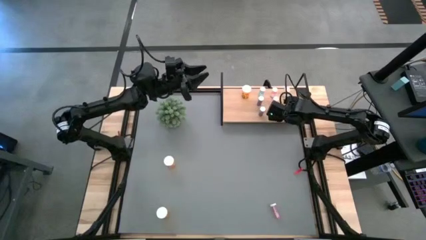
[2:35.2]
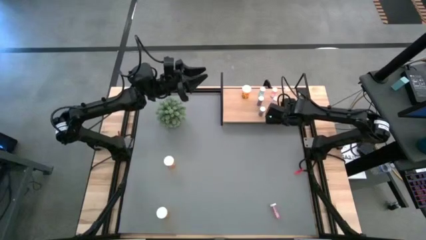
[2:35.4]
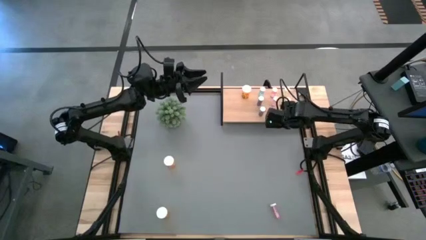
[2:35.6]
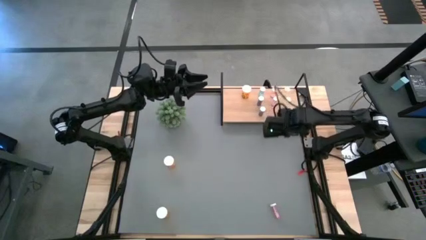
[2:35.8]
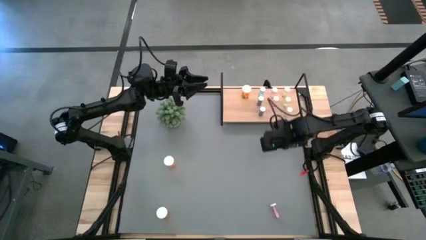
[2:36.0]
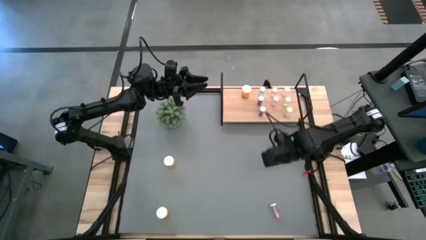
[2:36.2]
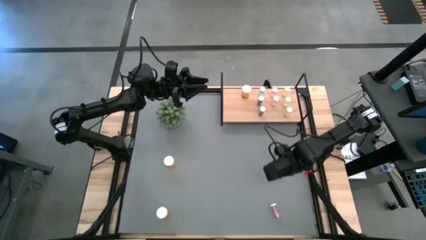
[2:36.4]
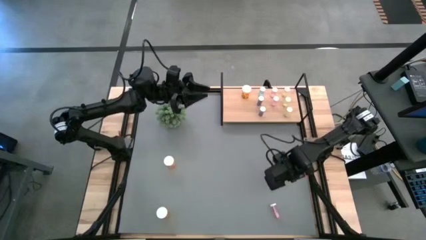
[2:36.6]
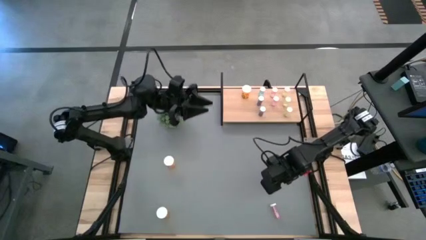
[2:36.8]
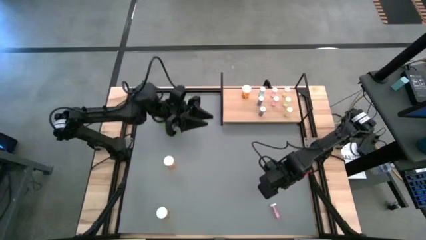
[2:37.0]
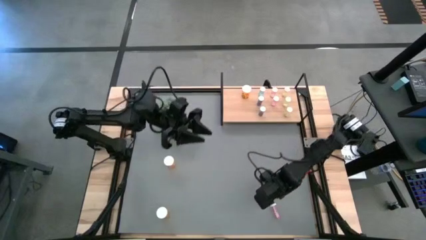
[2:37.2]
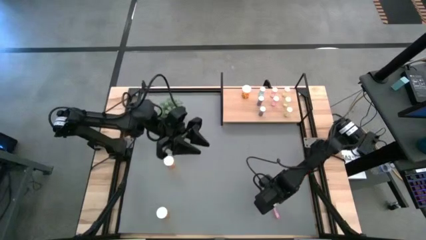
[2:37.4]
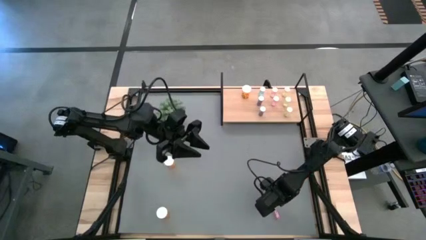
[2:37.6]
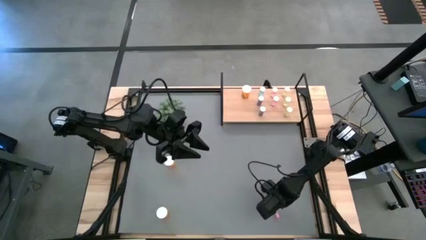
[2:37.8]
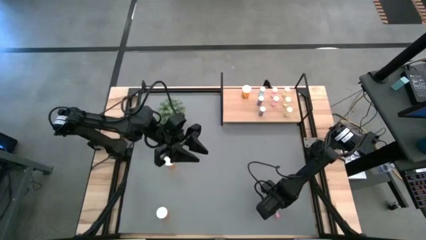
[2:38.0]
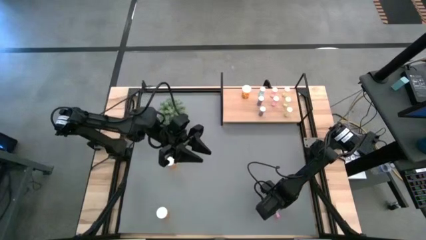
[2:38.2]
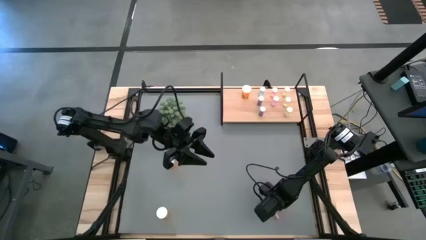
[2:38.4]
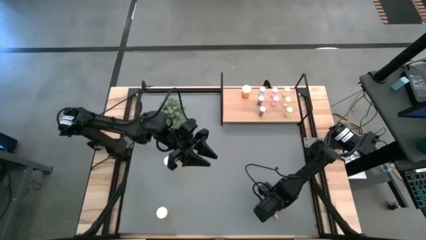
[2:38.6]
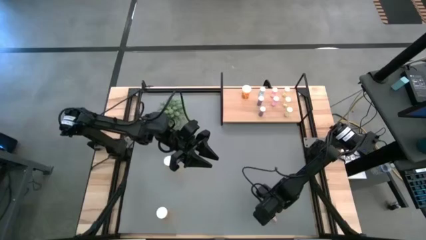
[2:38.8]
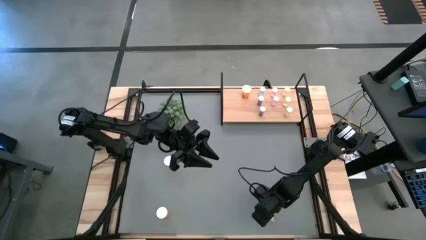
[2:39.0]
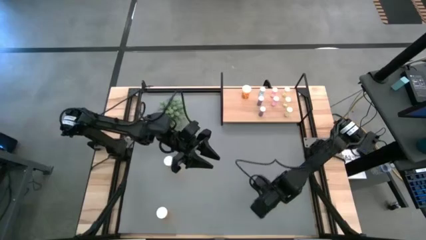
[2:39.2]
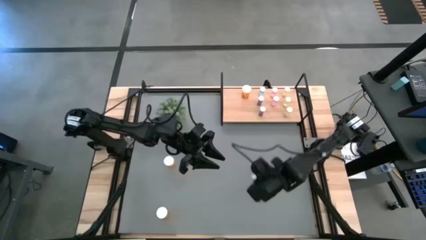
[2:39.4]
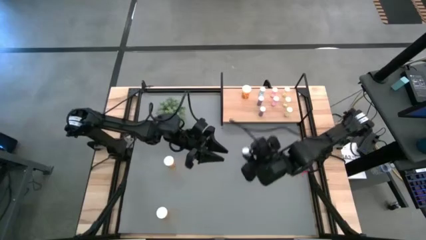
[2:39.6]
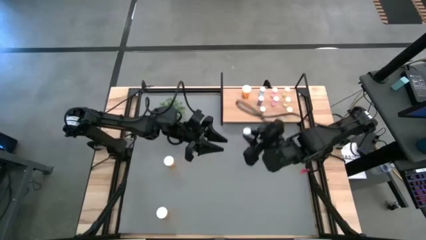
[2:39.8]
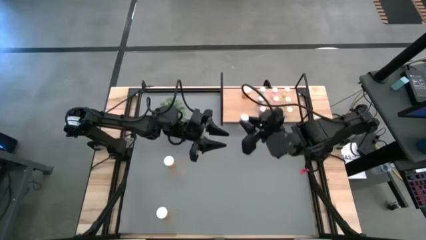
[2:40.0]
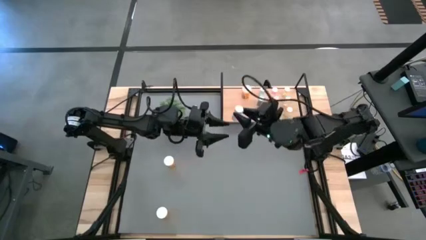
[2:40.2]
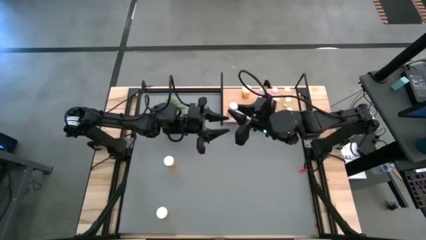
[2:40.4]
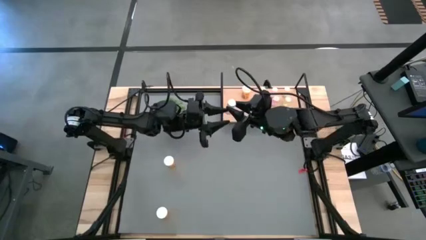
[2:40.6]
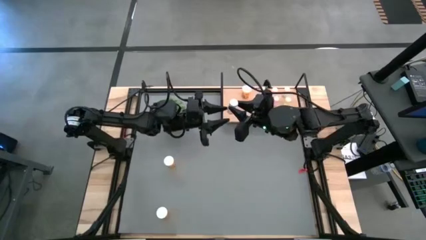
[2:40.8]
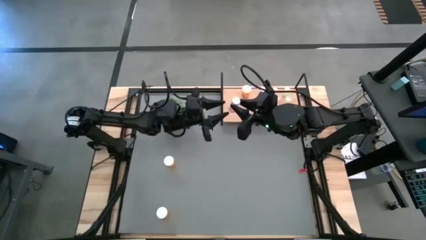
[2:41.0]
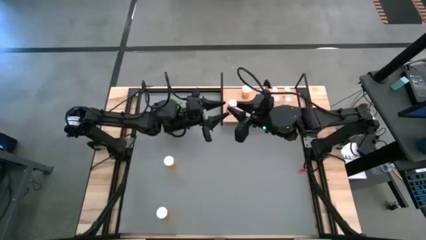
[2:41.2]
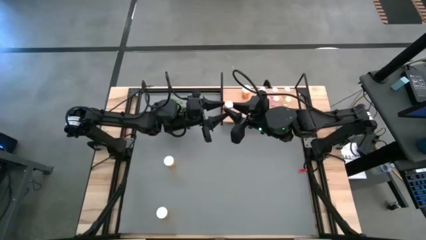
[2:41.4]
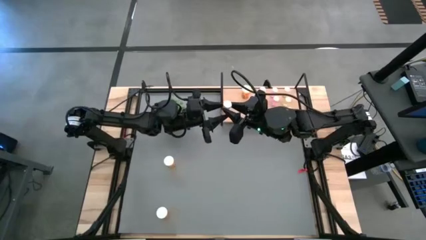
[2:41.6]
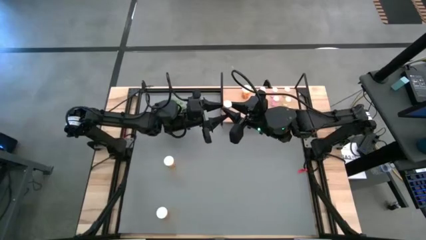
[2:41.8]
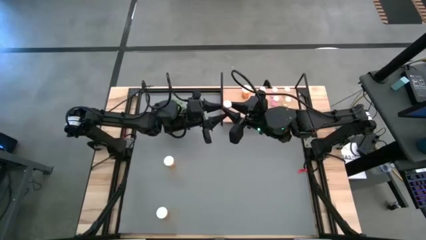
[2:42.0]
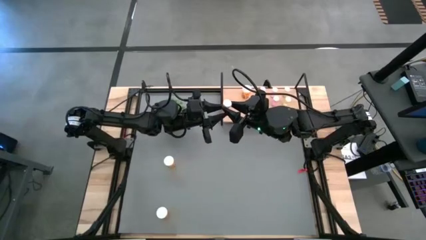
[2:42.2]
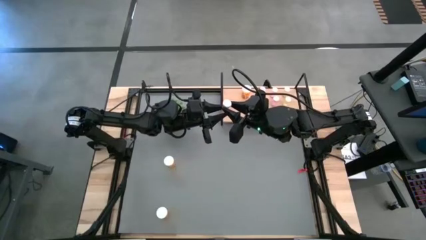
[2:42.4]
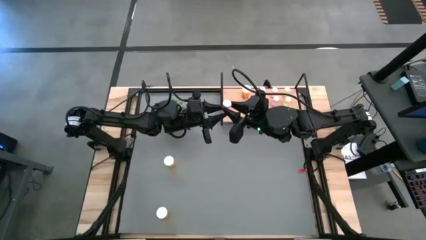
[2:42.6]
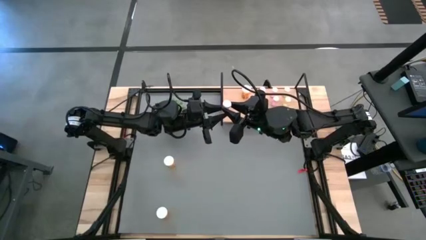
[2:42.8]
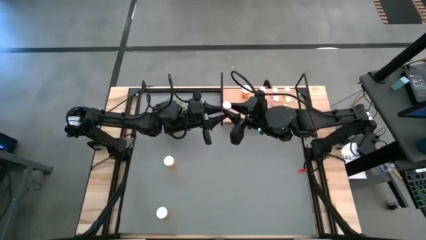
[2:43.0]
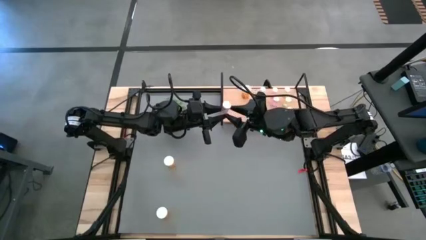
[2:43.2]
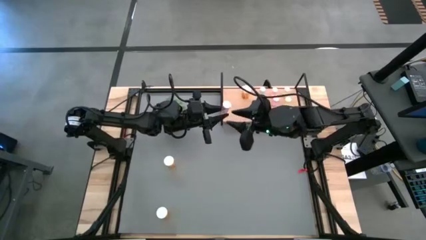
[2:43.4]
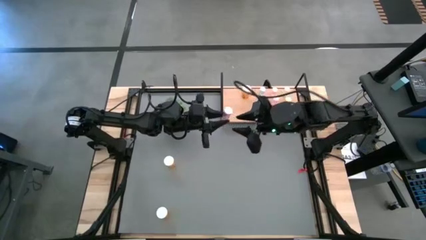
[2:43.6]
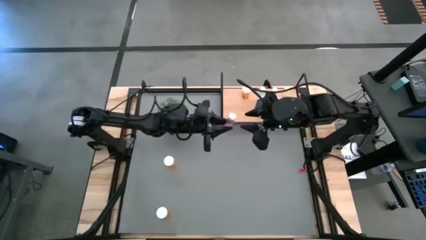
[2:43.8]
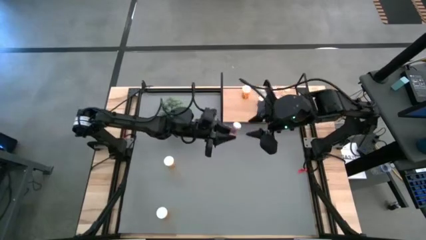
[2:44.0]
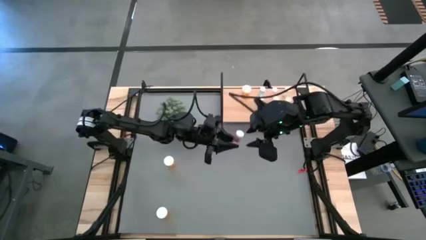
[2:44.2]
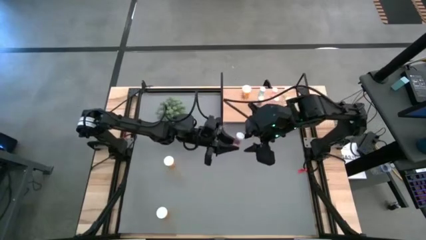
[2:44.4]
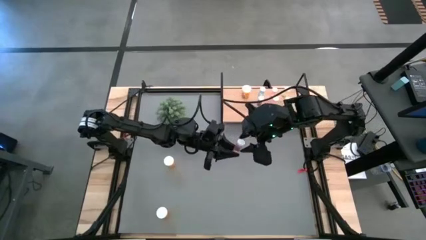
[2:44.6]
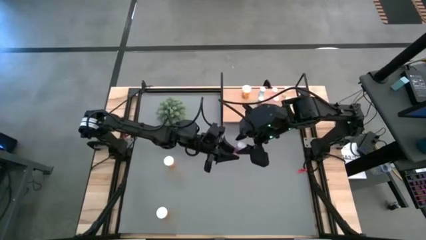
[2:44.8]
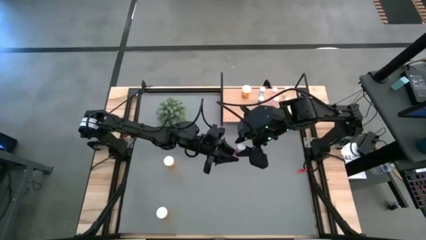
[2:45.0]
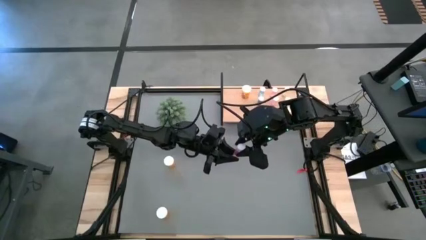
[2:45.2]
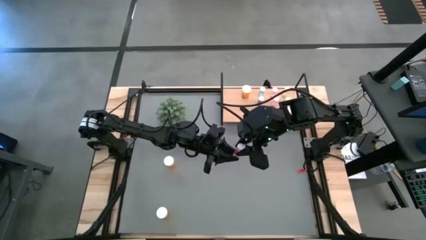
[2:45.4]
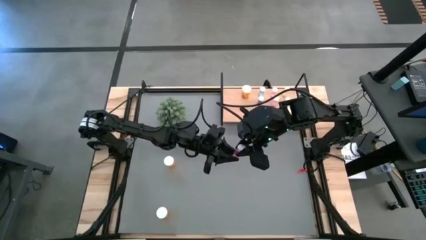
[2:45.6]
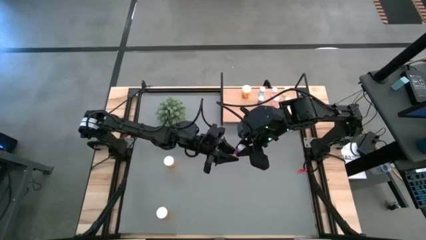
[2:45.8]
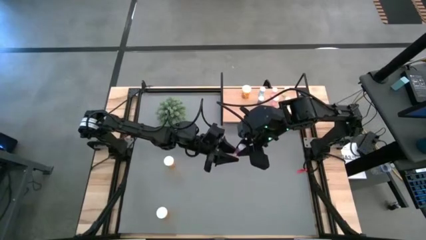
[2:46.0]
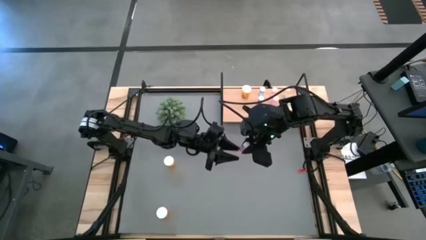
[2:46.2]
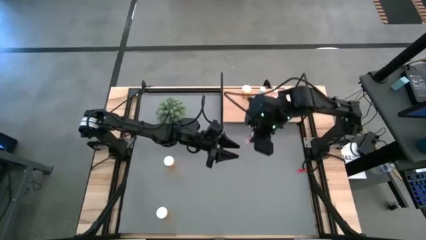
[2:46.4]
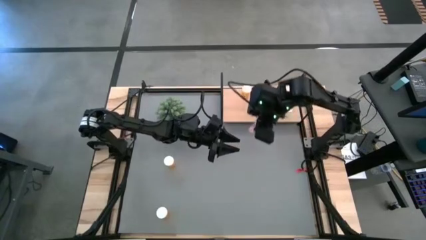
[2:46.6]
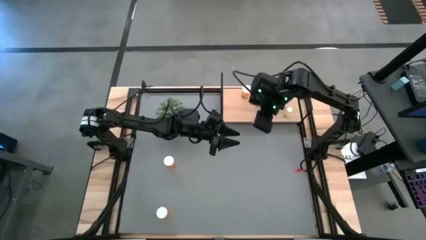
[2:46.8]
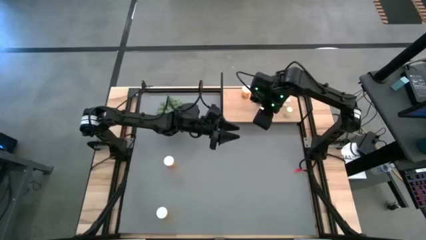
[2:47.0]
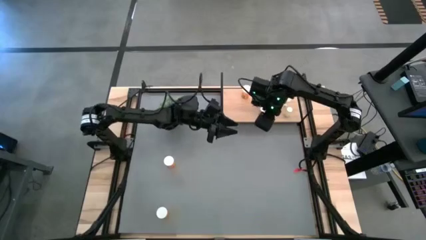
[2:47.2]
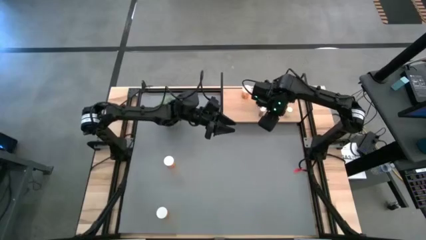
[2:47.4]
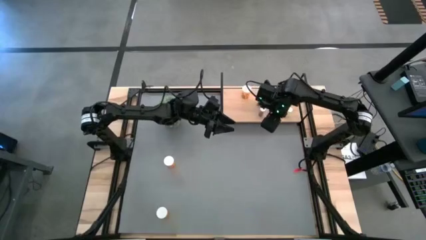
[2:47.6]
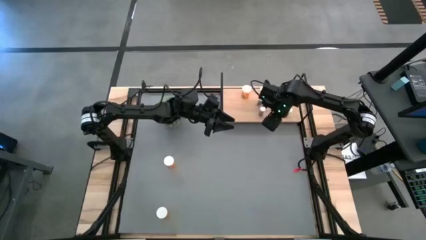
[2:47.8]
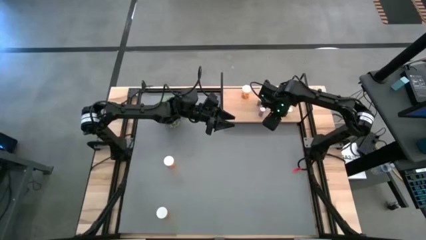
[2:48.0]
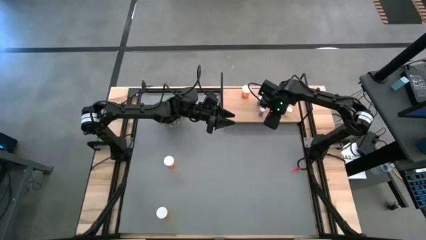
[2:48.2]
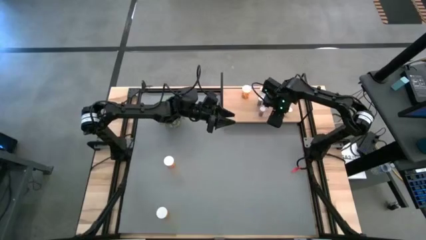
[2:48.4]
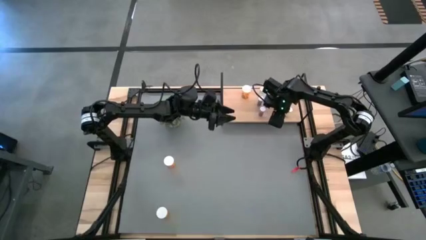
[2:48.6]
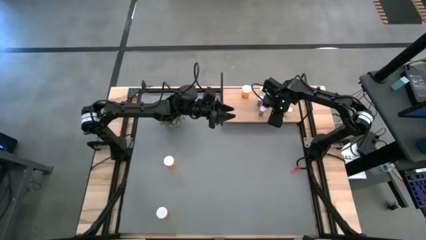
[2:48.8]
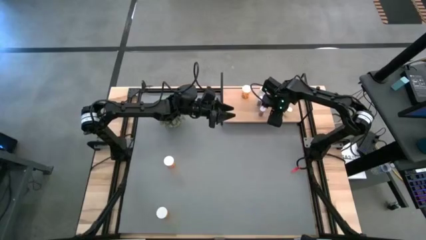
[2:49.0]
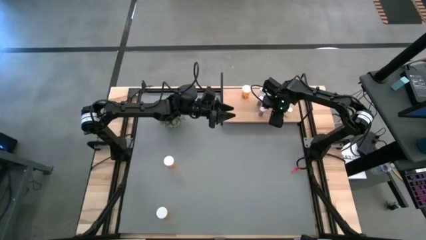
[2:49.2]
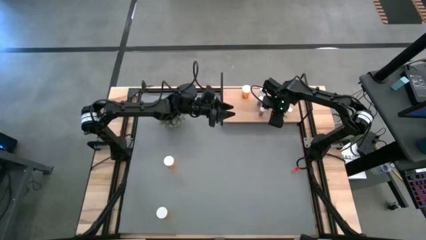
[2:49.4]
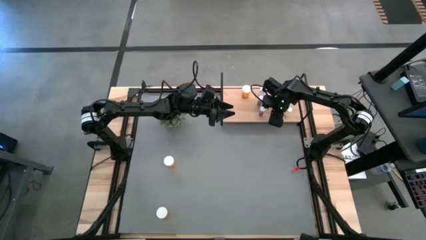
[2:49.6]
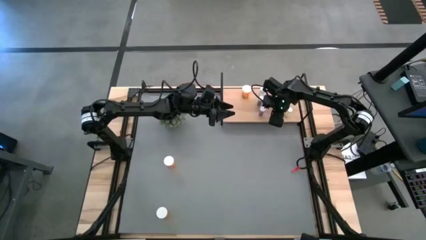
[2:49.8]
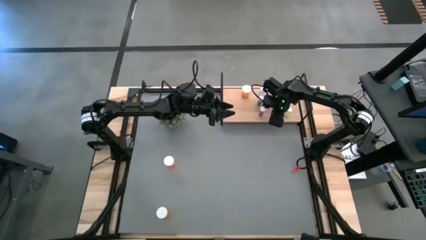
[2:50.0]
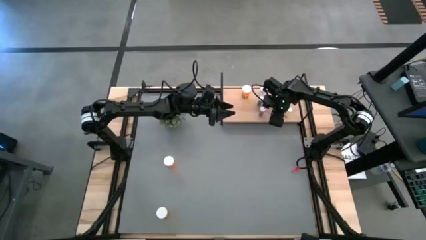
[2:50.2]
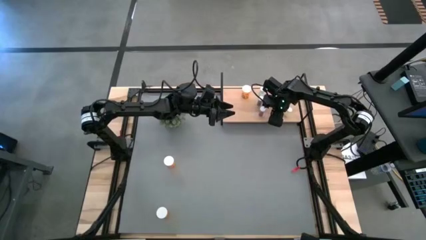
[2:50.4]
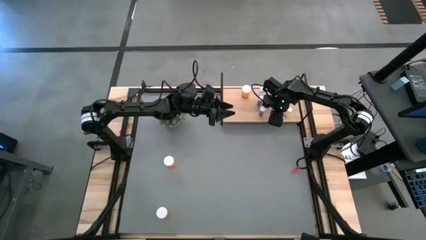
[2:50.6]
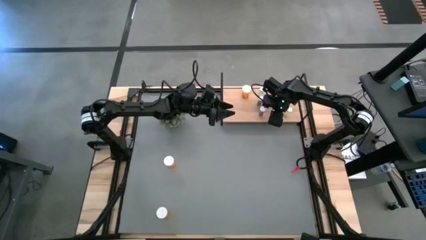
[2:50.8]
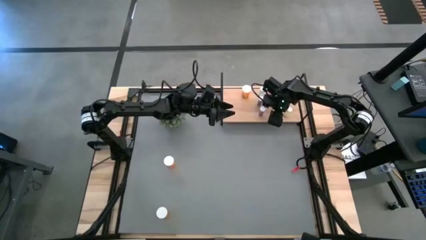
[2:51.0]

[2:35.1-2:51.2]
Task: Pick and place medicine bottles onto shelf by color
Put the pink pill bottle on the shelf aligned with the other pink pill bottles
